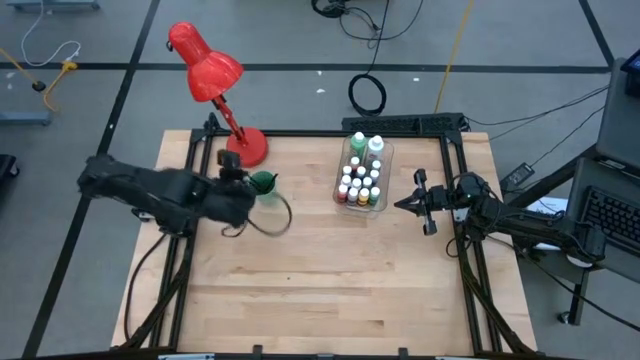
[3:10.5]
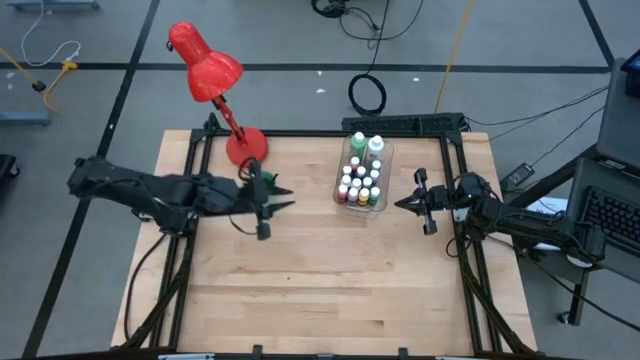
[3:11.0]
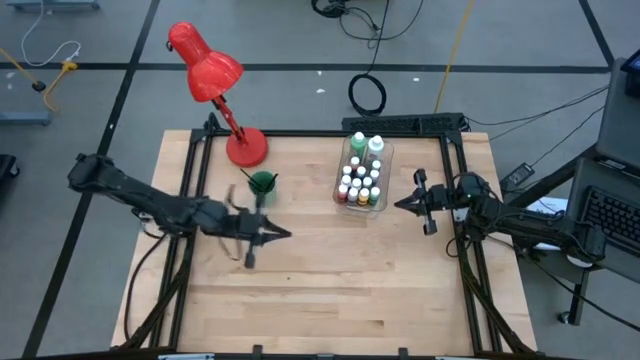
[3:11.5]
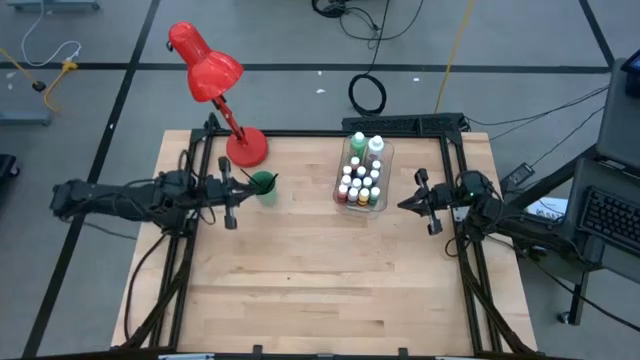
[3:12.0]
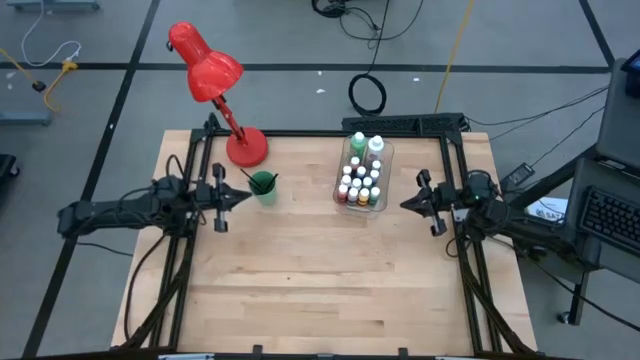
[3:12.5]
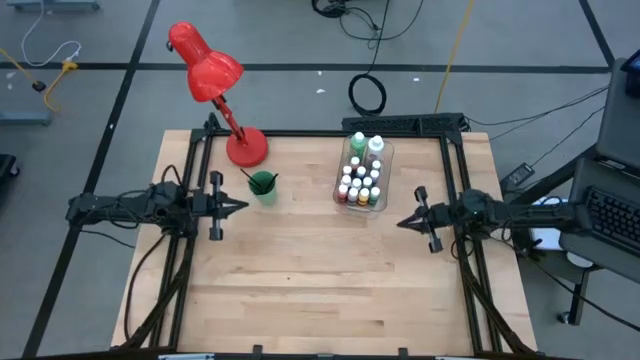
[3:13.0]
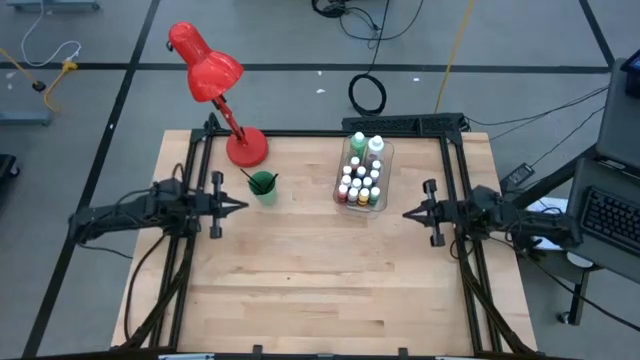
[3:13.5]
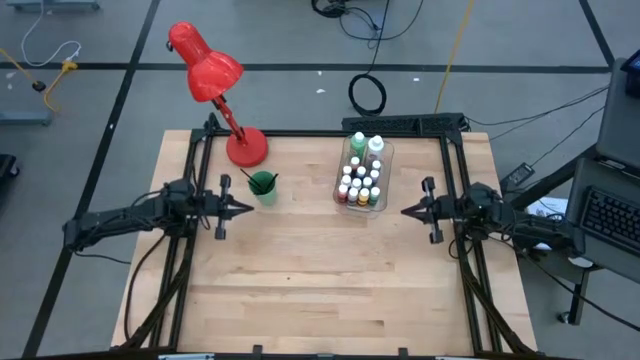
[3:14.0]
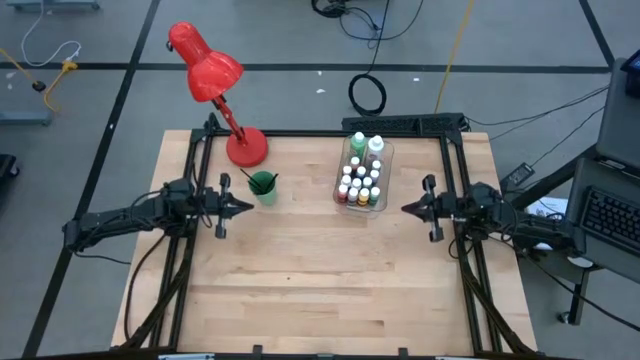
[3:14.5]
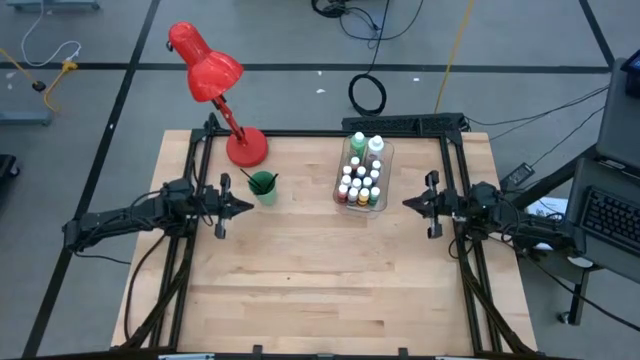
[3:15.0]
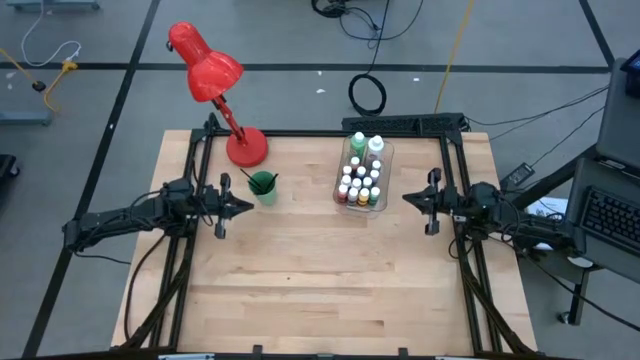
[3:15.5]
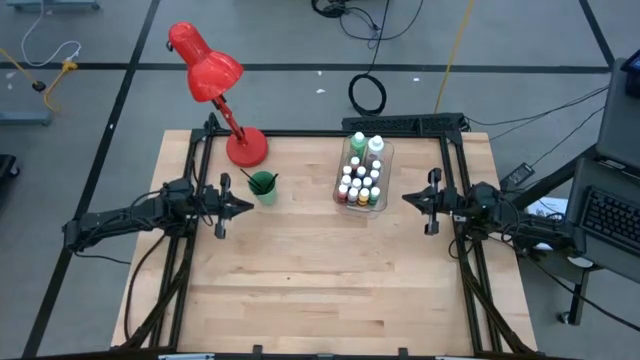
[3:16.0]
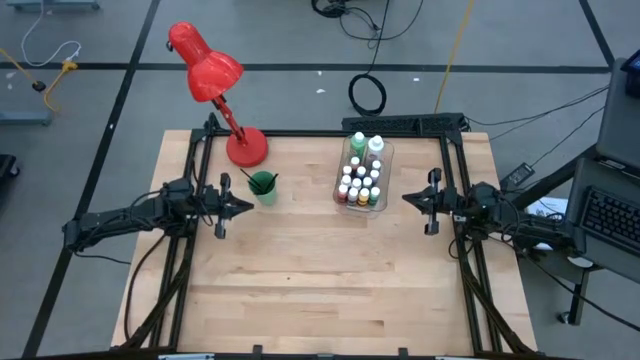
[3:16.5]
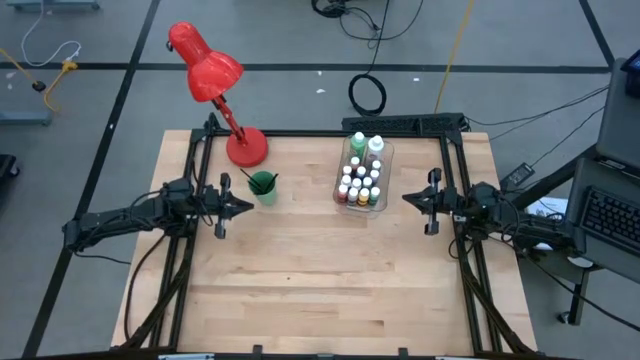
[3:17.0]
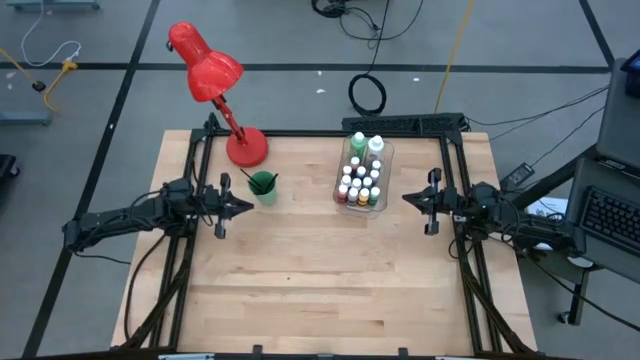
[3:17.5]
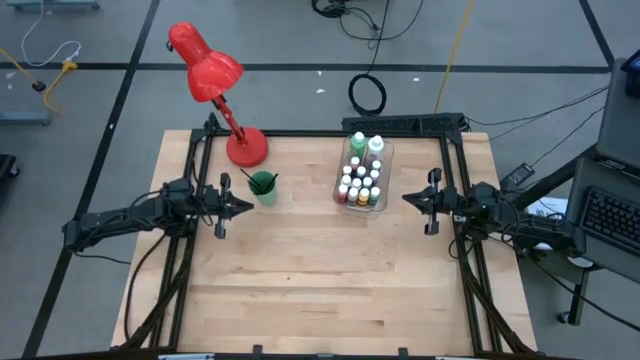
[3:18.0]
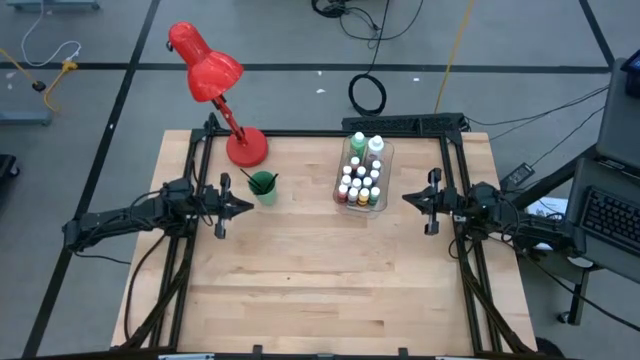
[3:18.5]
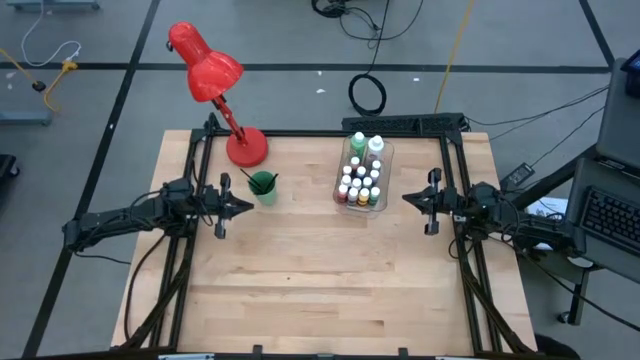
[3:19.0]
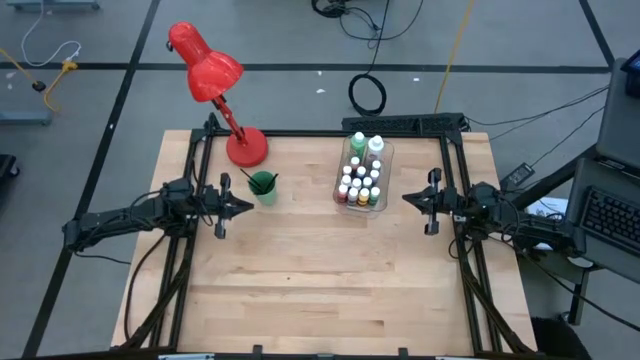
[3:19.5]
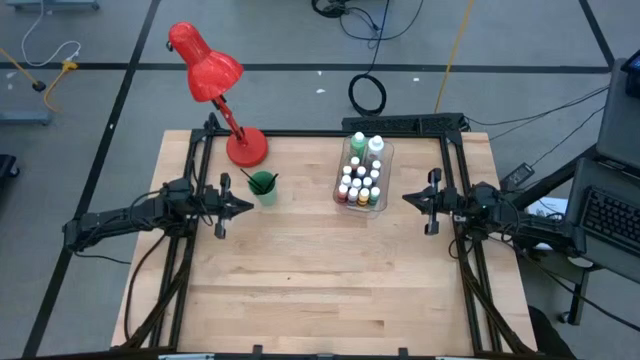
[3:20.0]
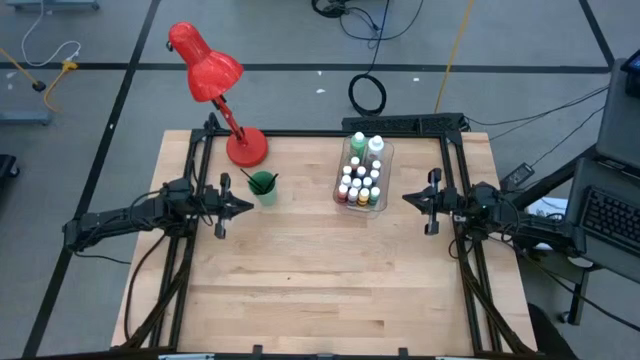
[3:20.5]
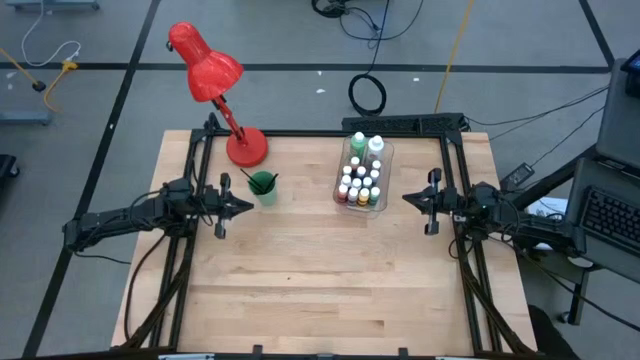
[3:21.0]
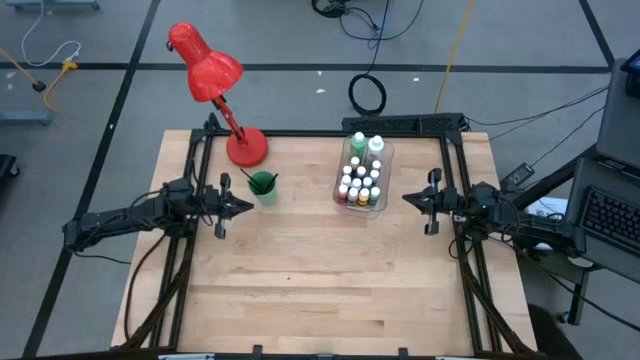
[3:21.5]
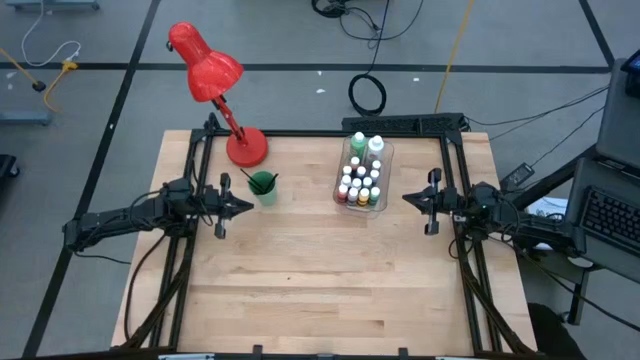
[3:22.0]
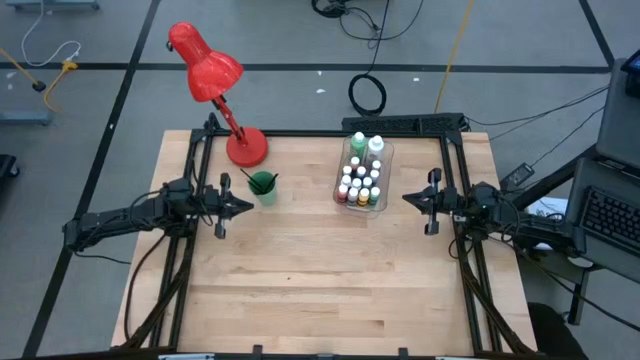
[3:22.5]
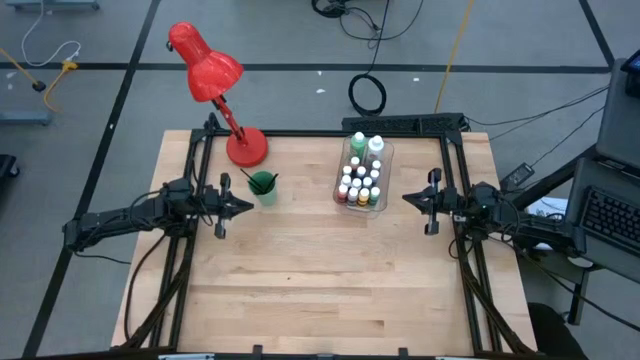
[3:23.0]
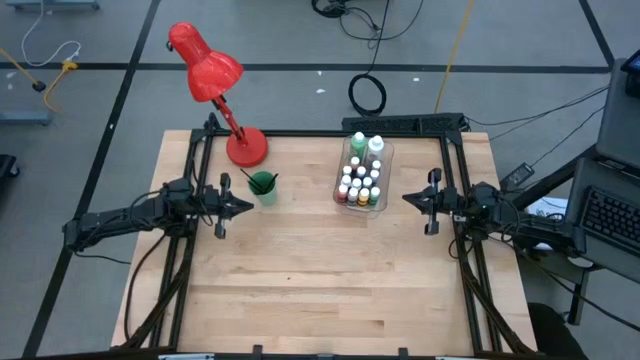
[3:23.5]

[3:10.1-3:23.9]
Task: Pick & Place Paint Supplies
Return to Home Position

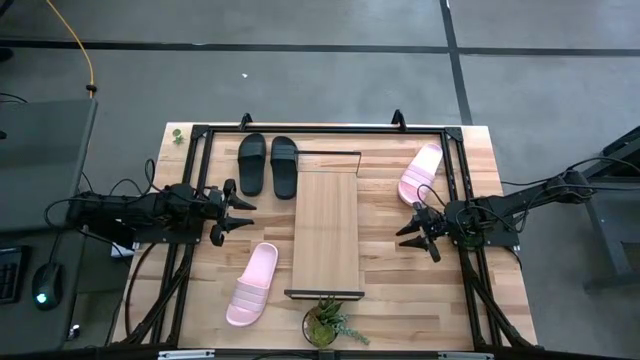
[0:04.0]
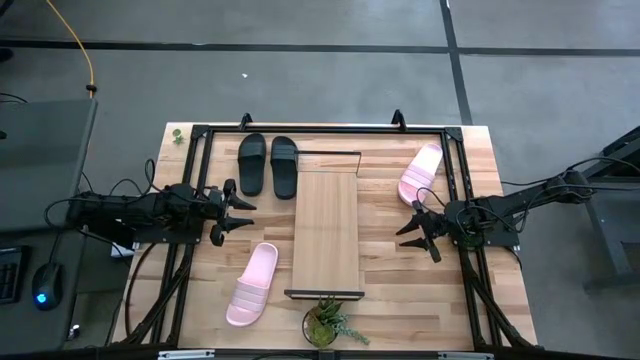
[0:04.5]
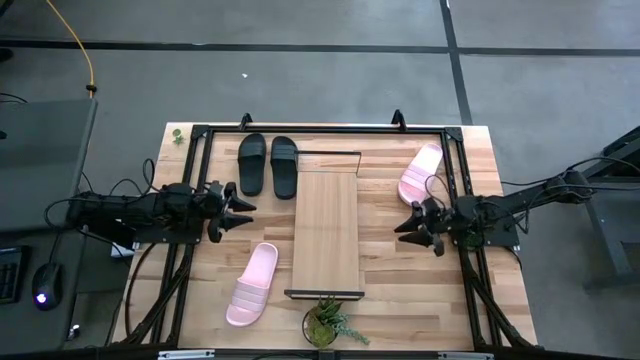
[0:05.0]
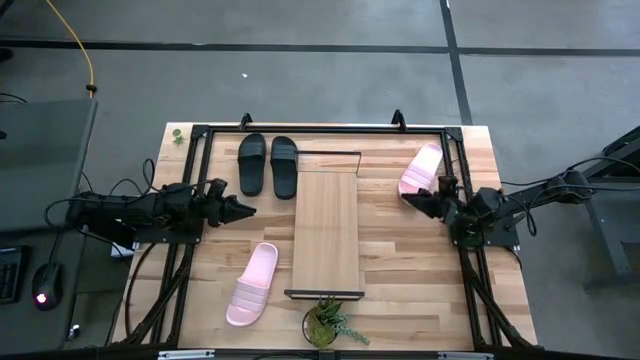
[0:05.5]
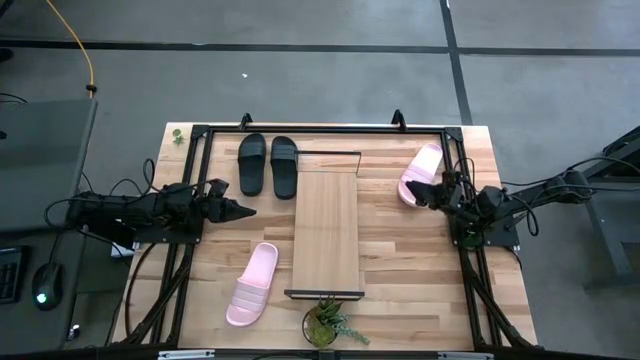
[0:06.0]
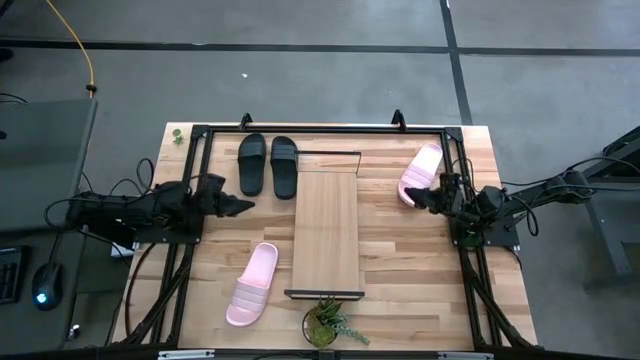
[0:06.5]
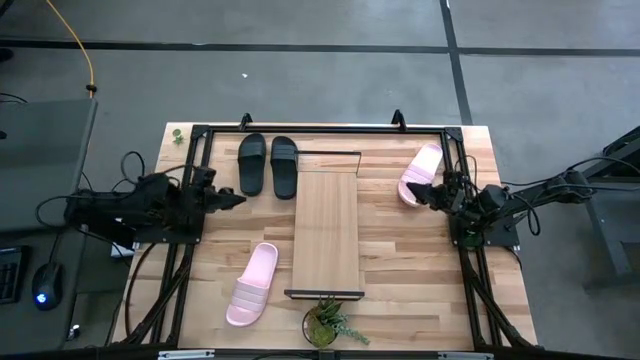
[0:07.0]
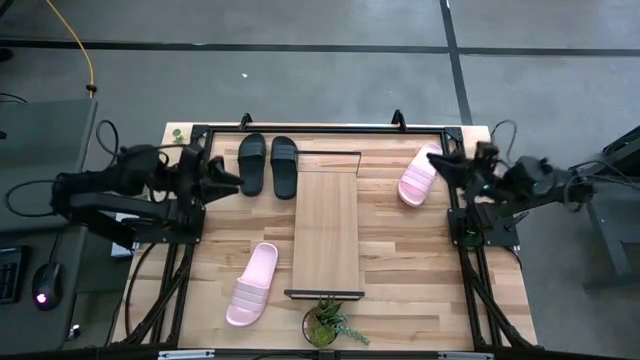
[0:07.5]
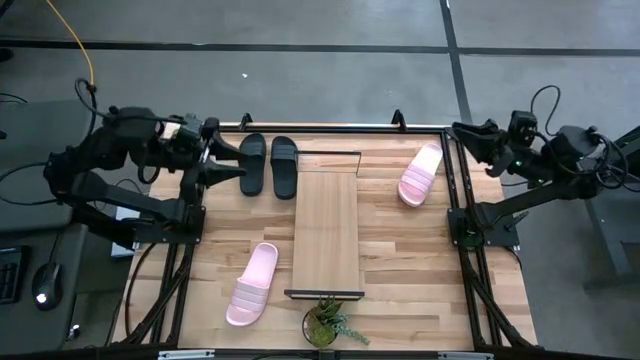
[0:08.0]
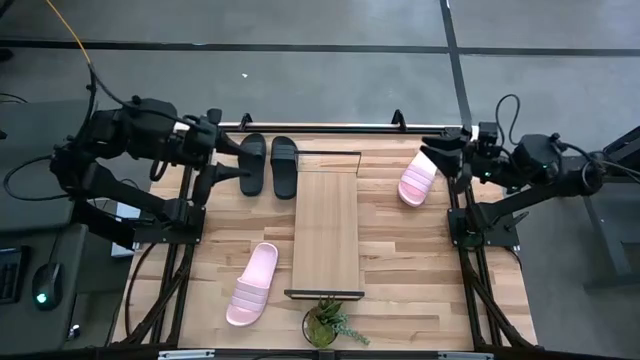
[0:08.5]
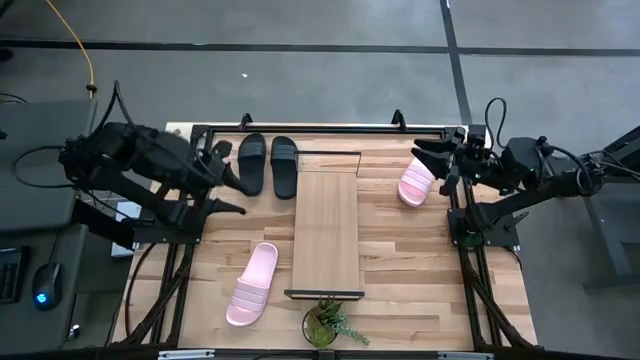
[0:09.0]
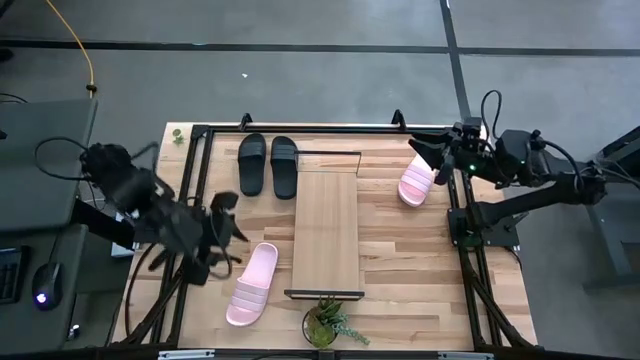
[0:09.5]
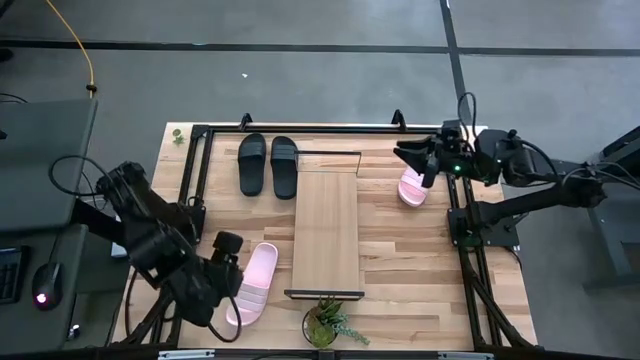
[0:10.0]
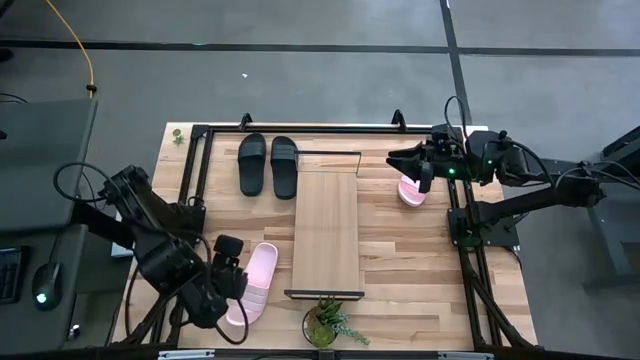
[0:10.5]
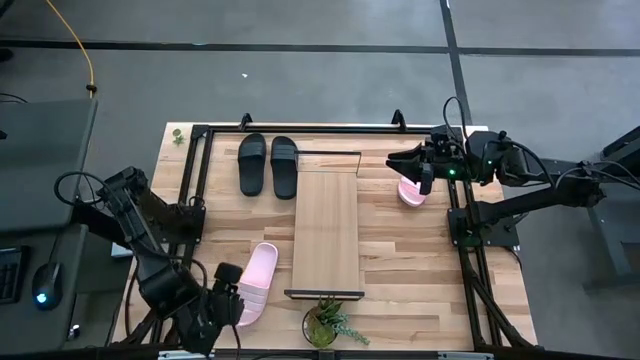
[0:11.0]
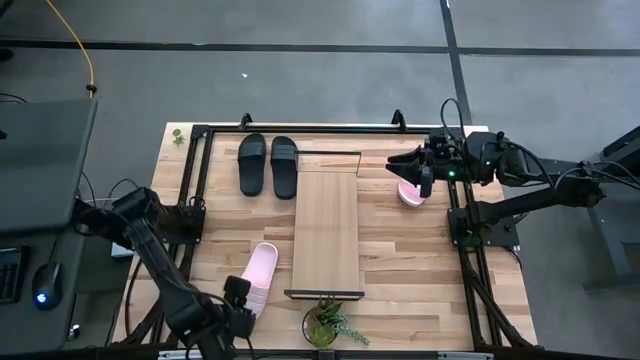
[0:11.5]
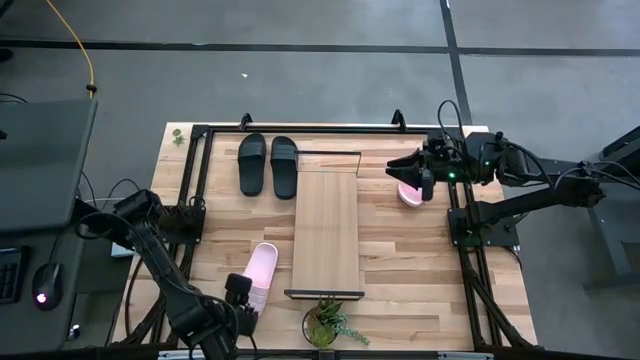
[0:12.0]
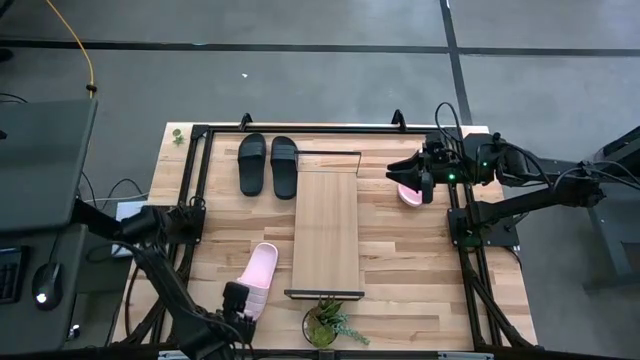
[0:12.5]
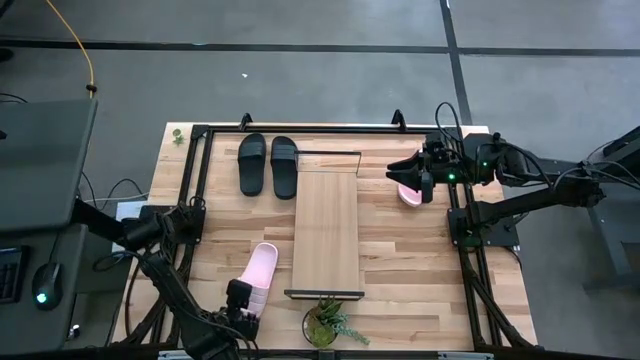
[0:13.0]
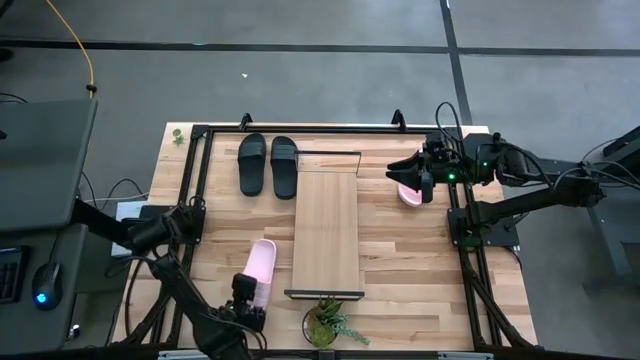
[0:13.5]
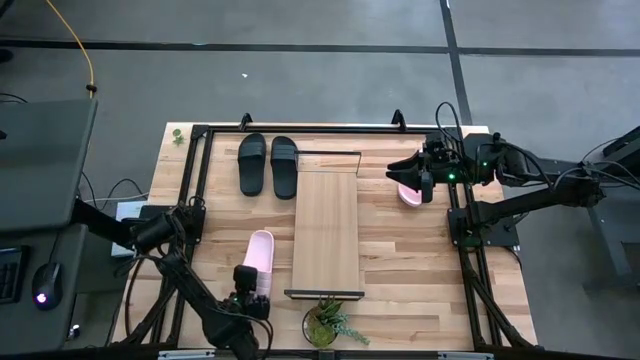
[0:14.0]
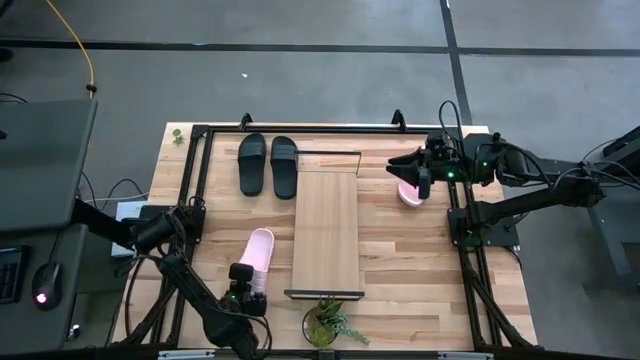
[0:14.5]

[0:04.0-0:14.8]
Task: Pick and place slides into the shelf
Put the bottom pink slides on the shelf
